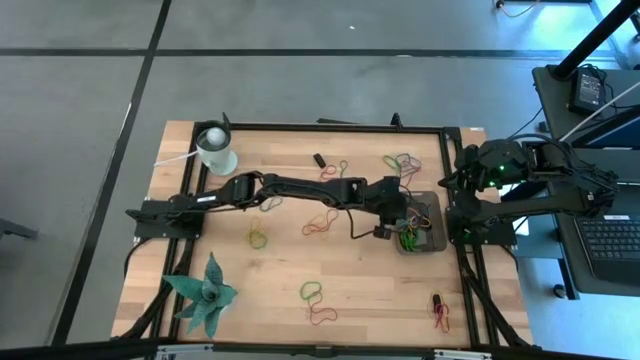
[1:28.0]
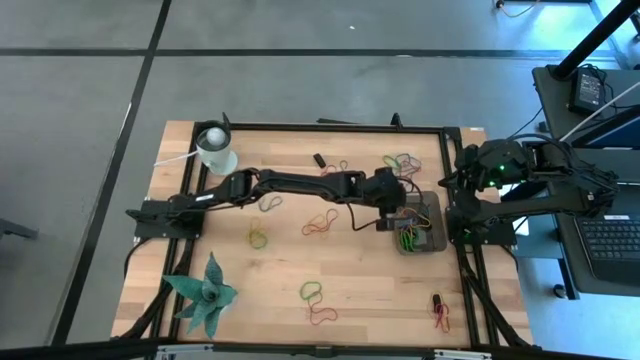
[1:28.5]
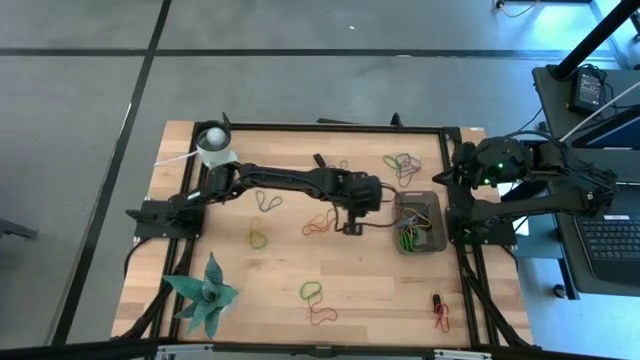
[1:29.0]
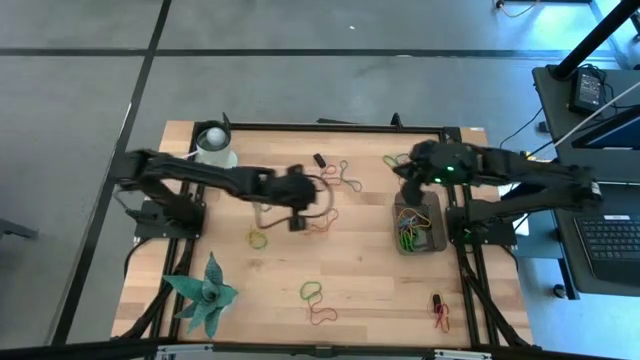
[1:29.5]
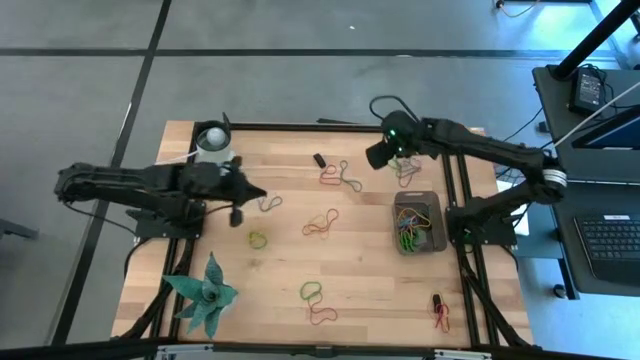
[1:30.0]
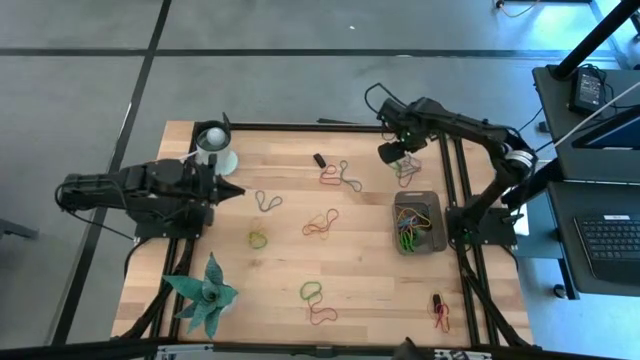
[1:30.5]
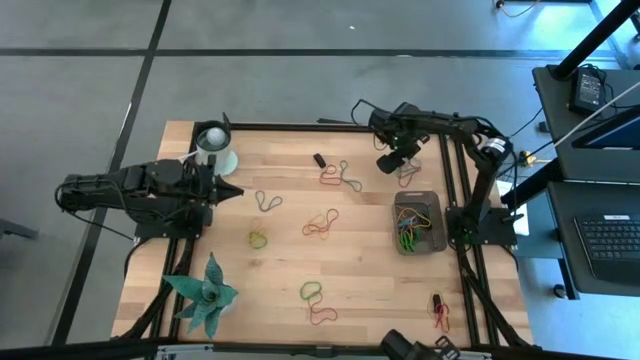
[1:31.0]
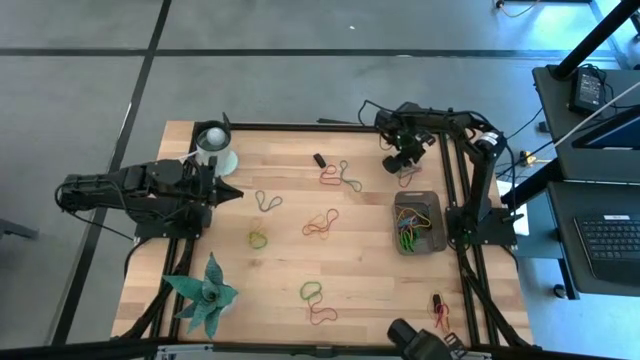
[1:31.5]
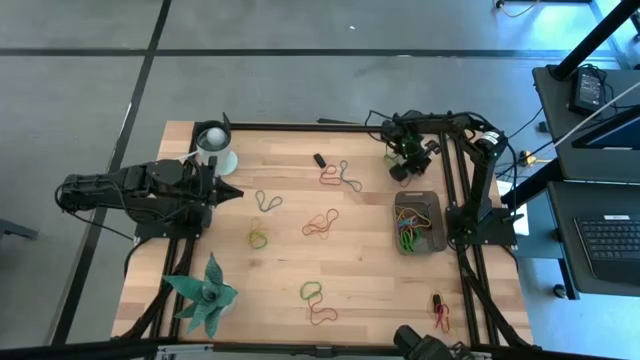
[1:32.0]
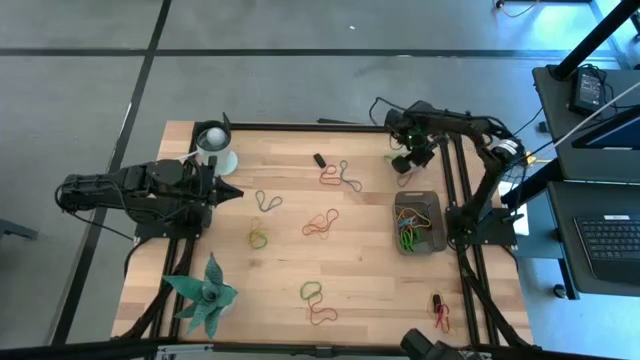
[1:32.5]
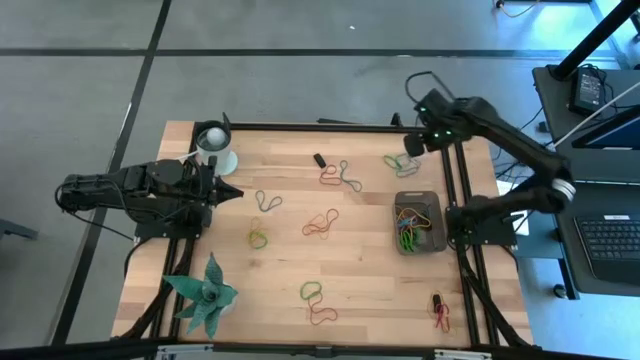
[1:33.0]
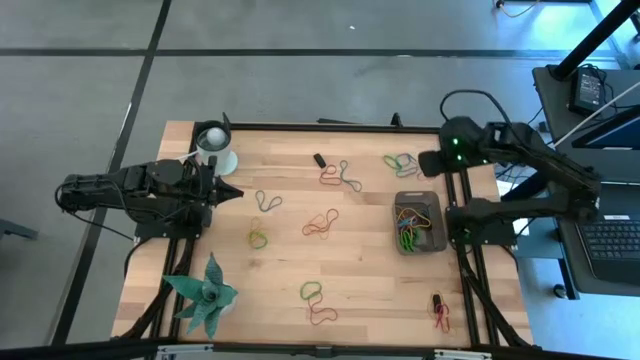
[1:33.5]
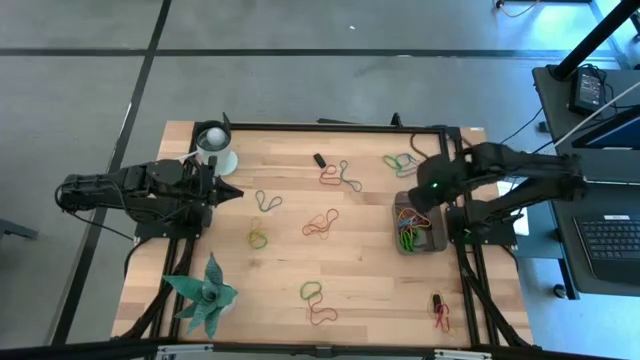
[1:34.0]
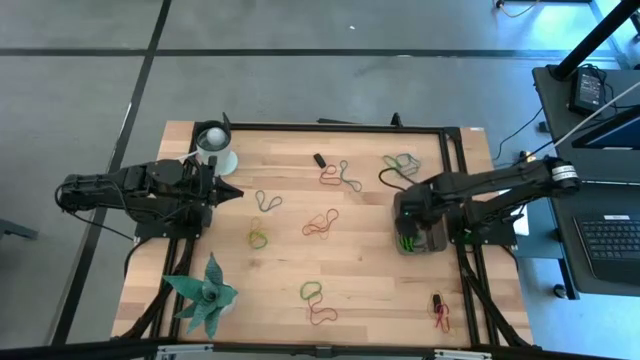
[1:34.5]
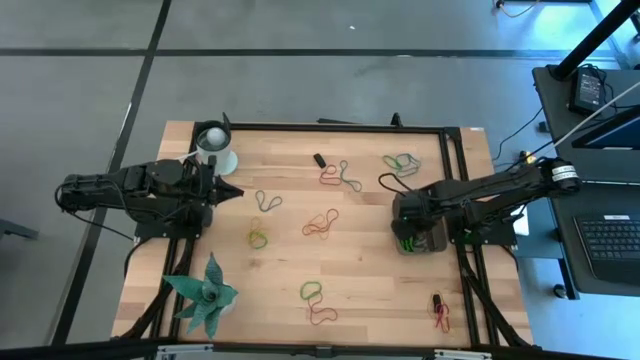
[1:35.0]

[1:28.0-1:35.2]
Task: Pick and place rubber bands into bin
Put the red rubber band into the black bin

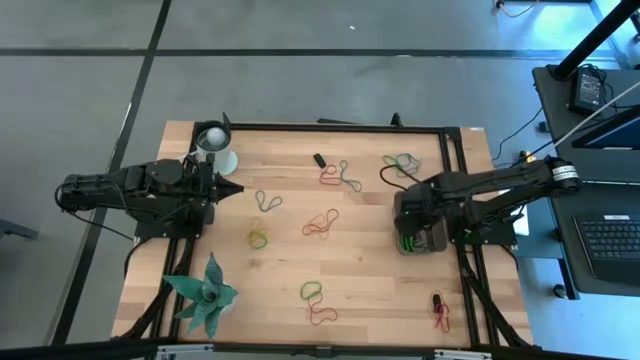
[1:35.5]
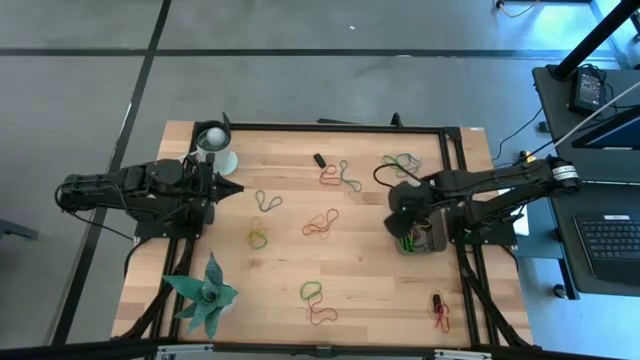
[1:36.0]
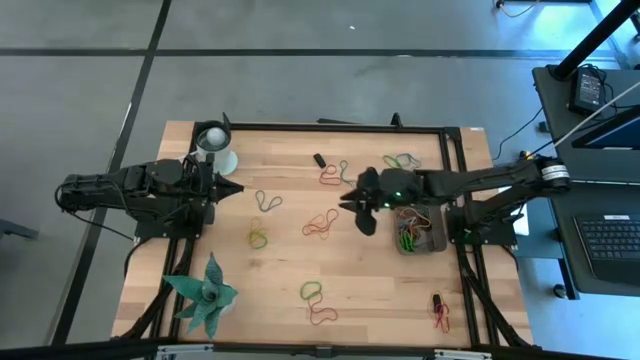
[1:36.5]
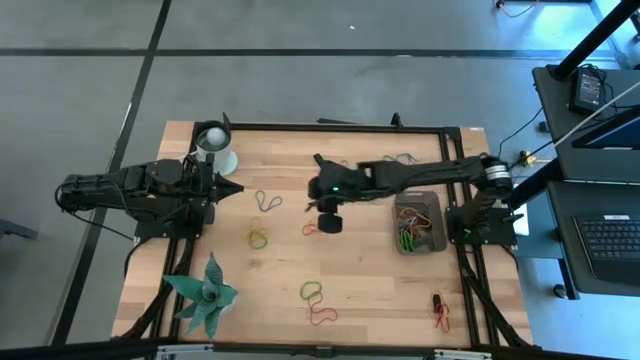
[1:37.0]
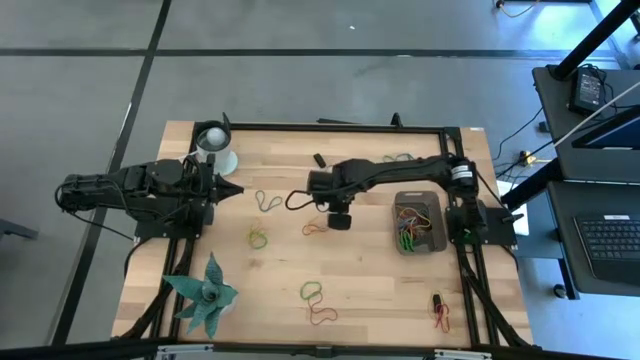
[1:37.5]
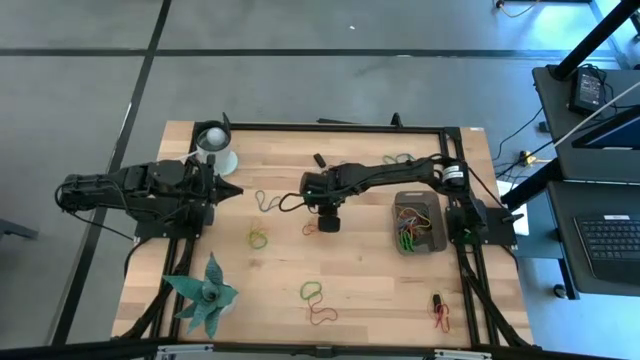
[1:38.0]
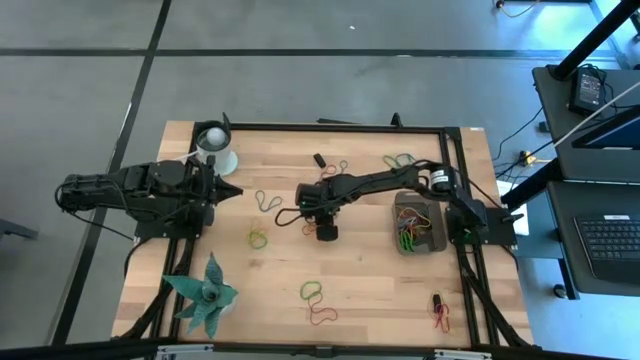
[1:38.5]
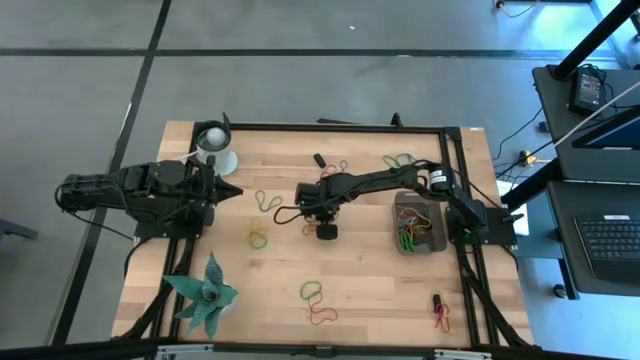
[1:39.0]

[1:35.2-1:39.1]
Put the yellow rubber band into the black bin

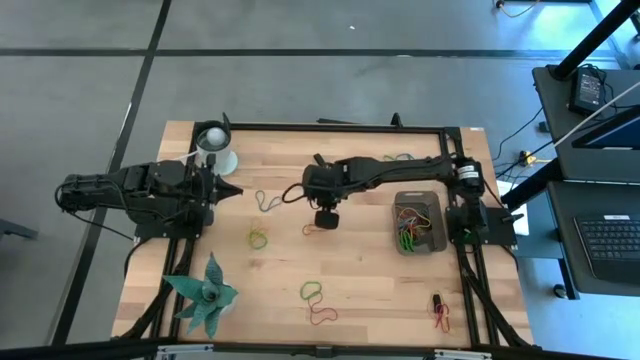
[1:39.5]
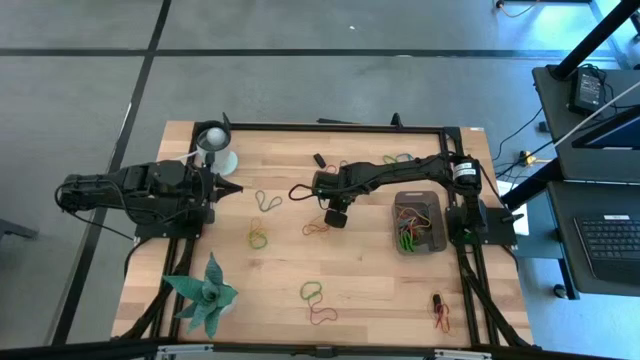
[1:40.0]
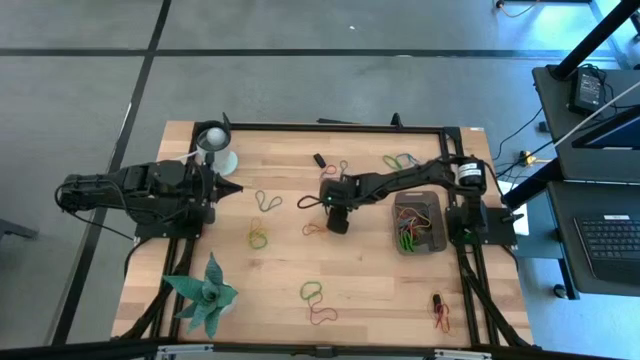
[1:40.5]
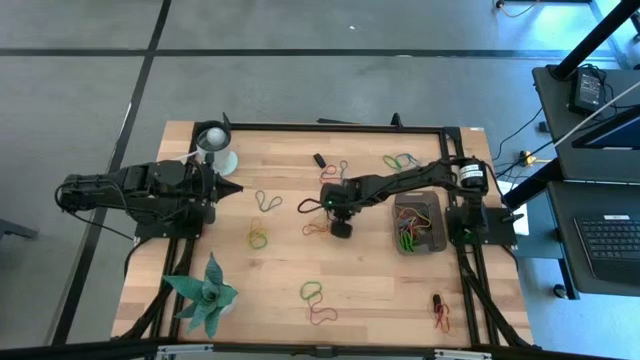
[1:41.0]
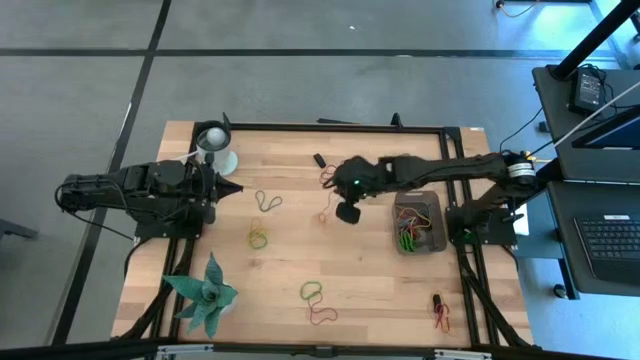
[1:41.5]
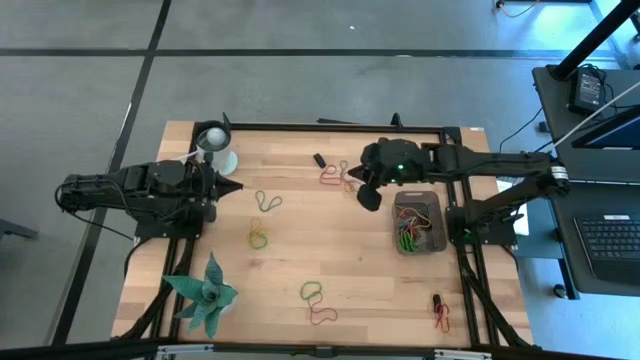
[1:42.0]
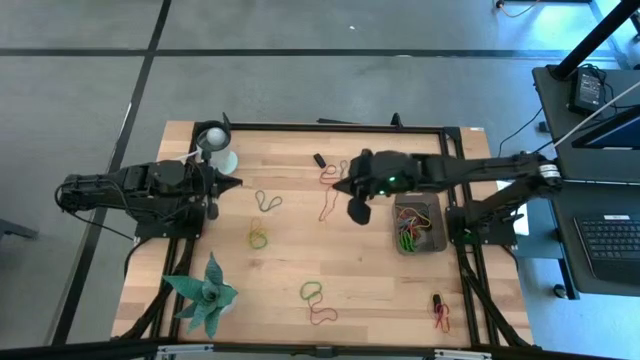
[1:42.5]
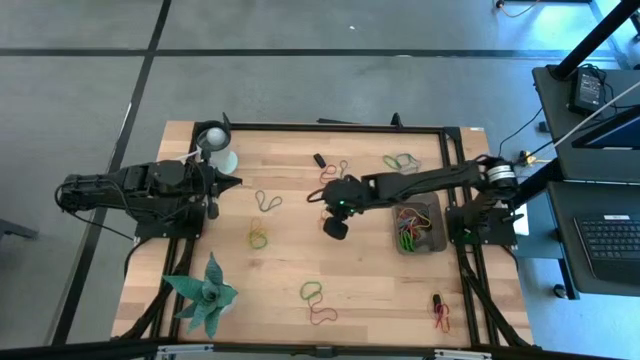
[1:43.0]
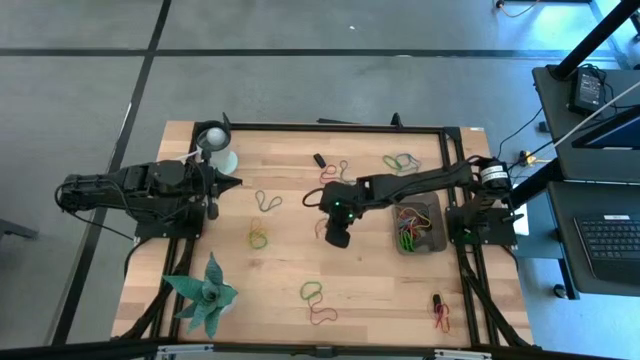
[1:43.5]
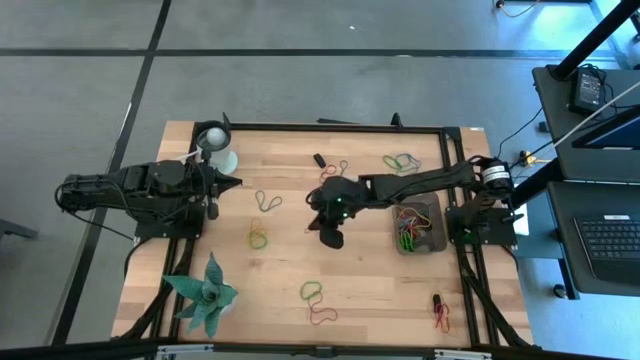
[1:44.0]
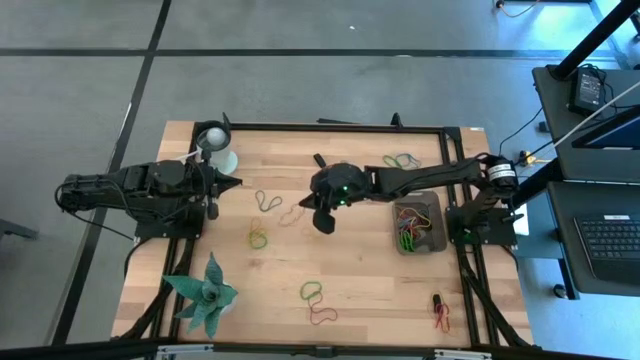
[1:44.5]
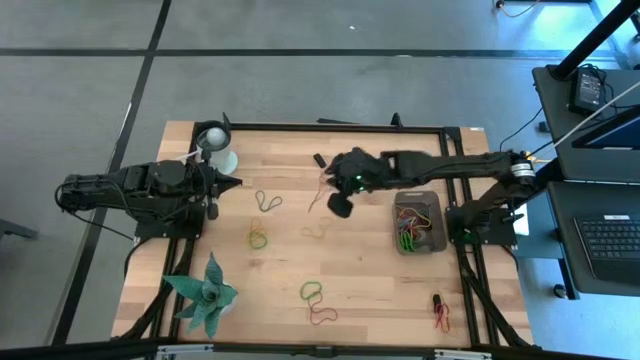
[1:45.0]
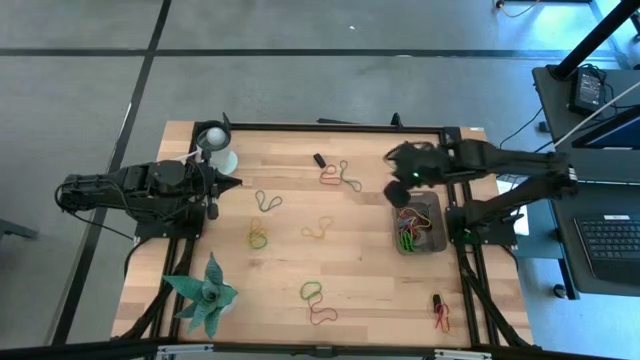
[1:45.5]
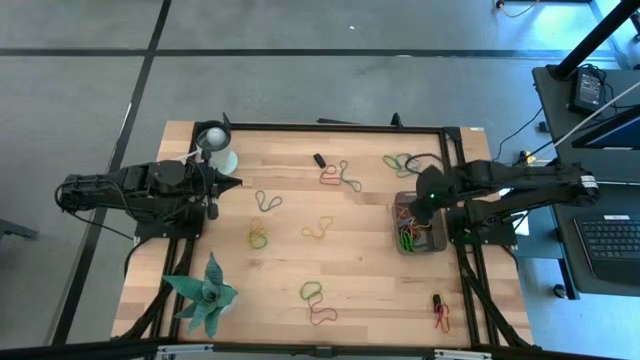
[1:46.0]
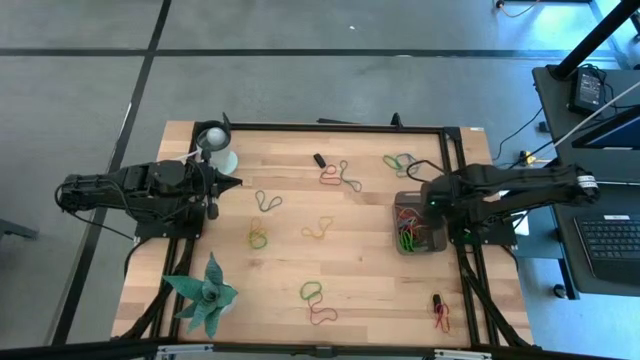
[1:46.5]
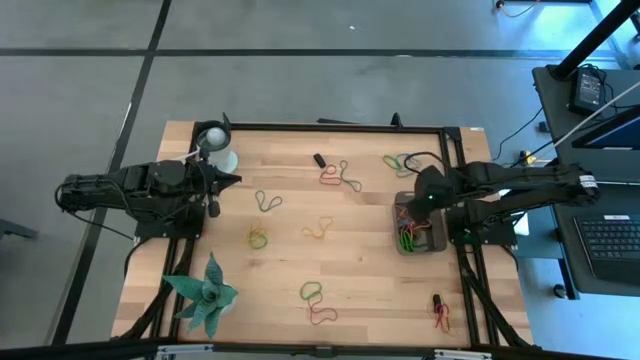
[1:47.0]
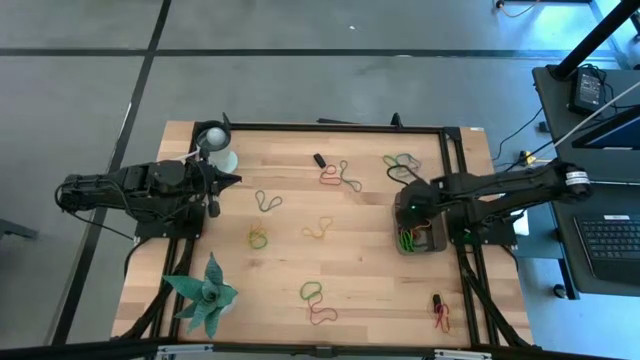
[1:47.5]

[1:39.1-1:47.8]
Put the red rubber band into the black bin

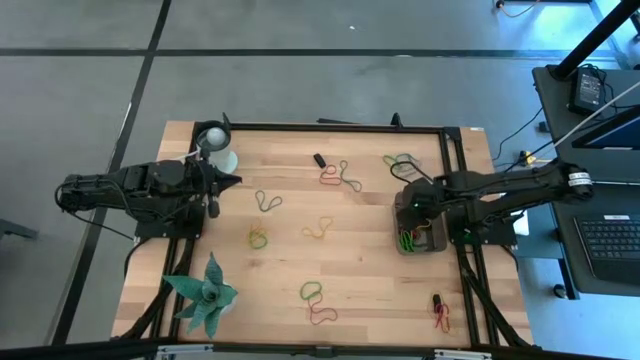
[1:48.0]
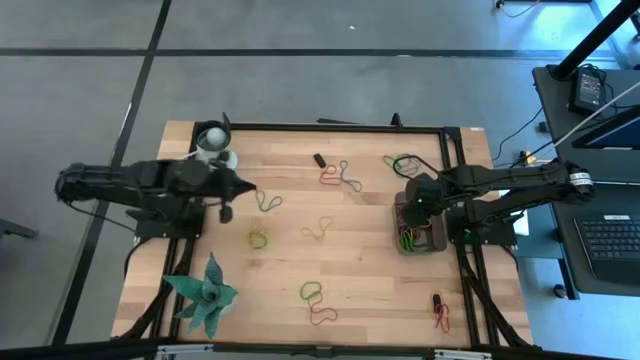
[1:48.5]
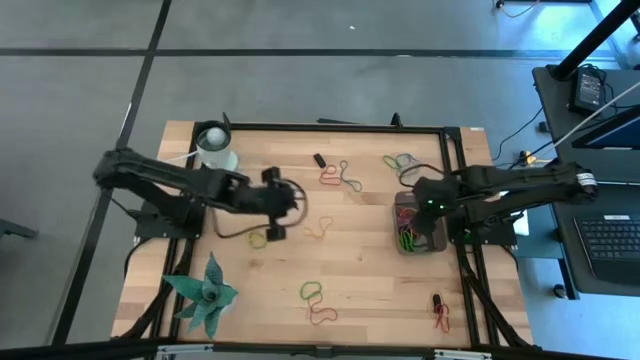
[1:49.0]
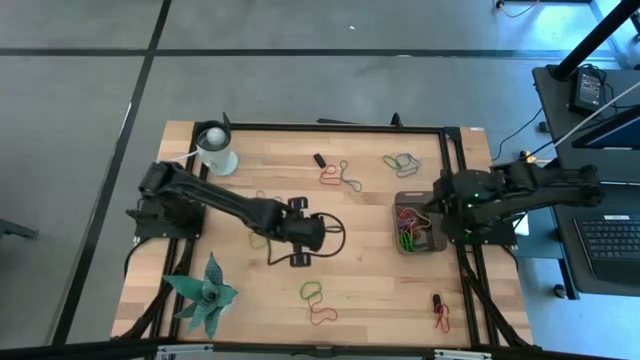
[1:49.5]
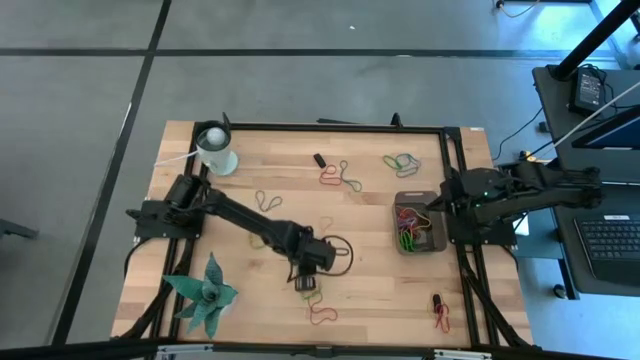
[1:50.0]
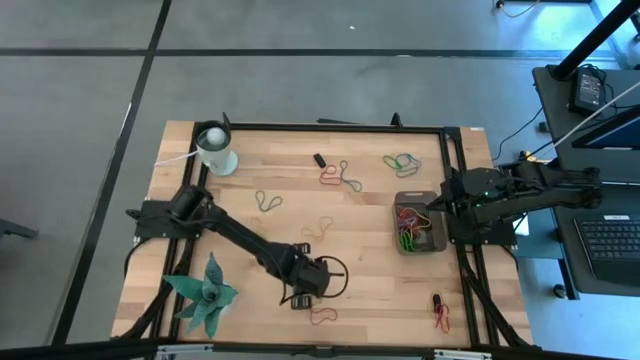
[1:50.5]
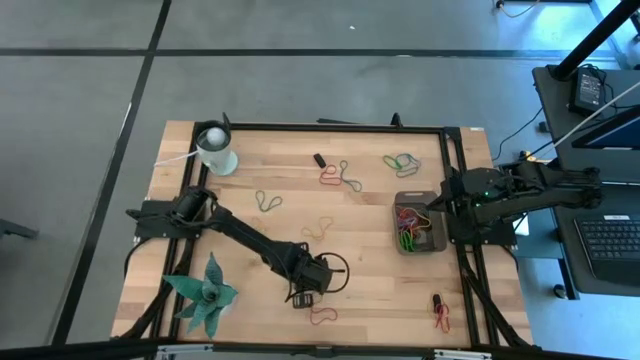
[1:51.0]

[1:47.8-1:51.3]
Put the green rubber band into the black bin
